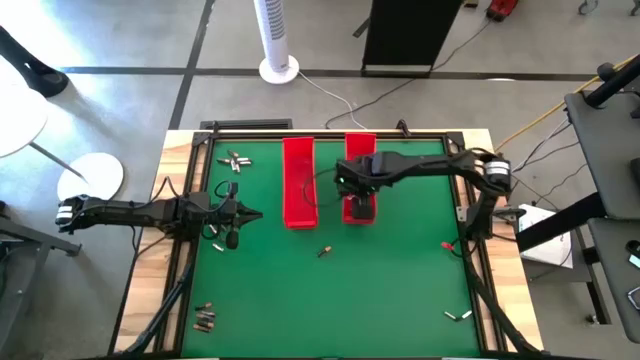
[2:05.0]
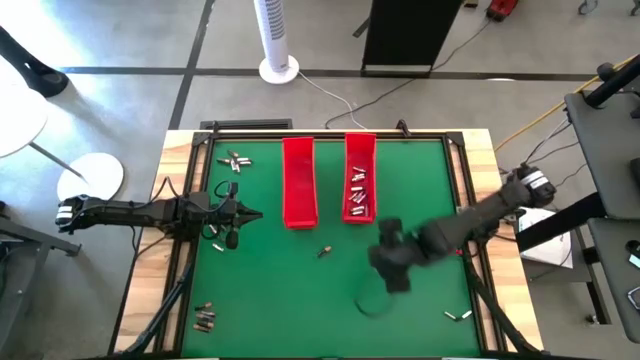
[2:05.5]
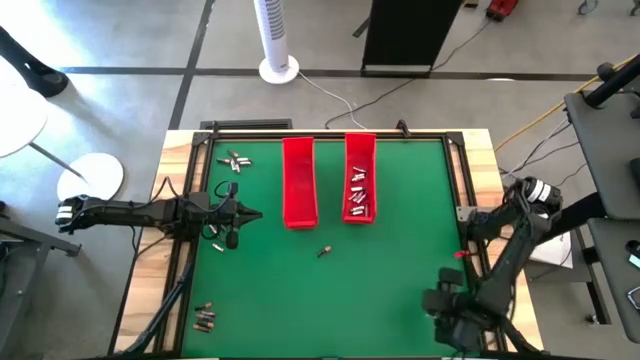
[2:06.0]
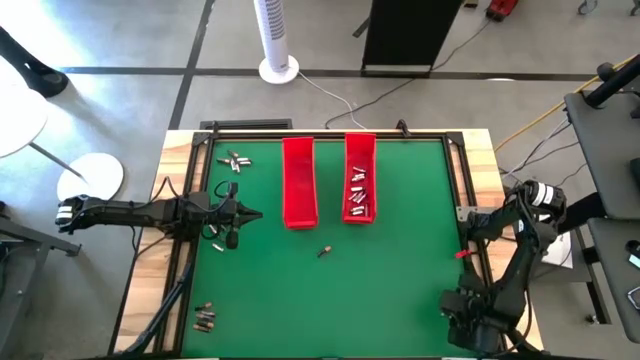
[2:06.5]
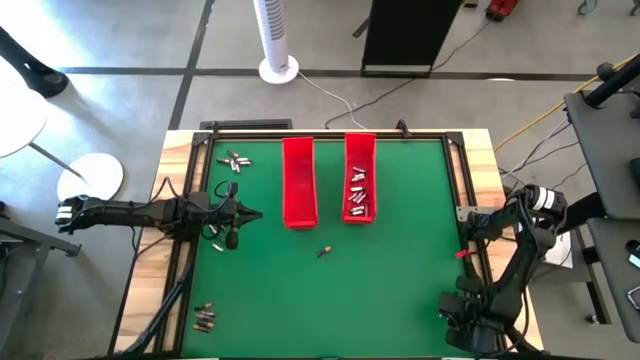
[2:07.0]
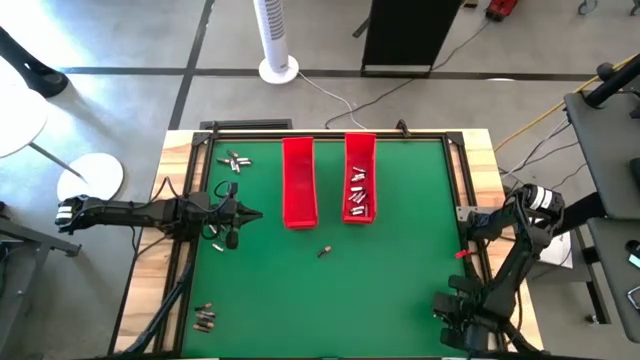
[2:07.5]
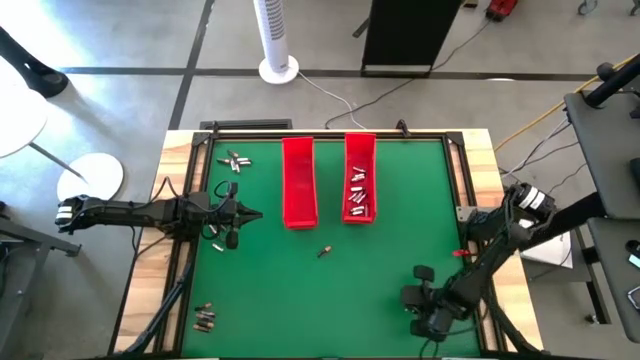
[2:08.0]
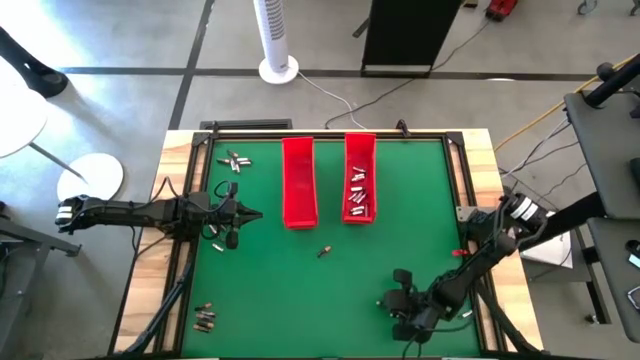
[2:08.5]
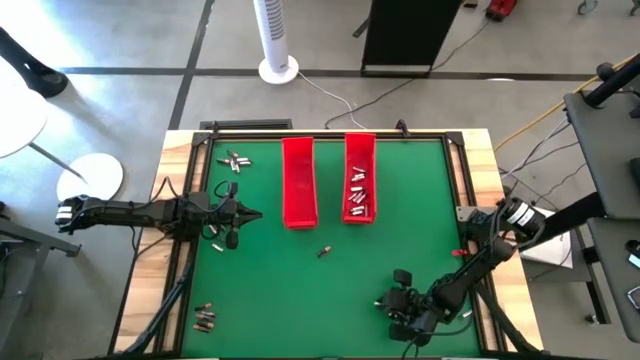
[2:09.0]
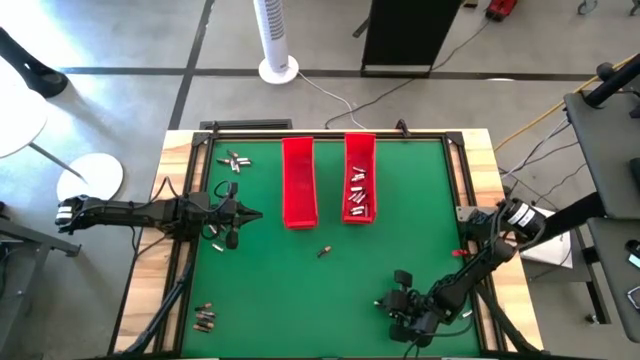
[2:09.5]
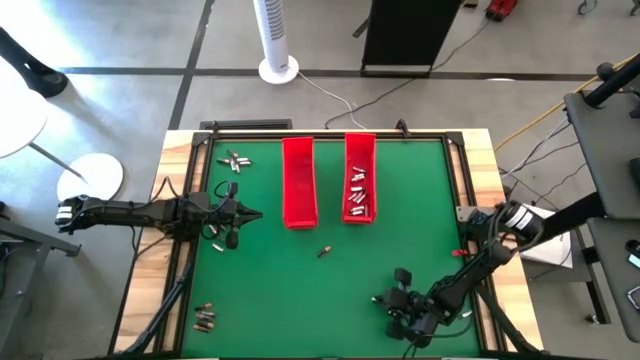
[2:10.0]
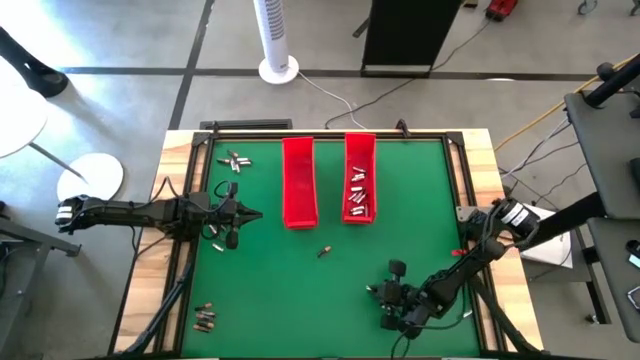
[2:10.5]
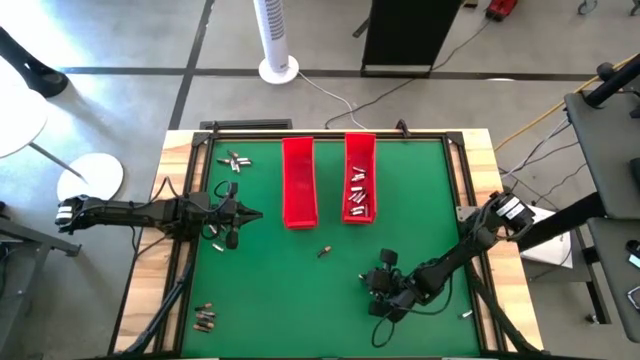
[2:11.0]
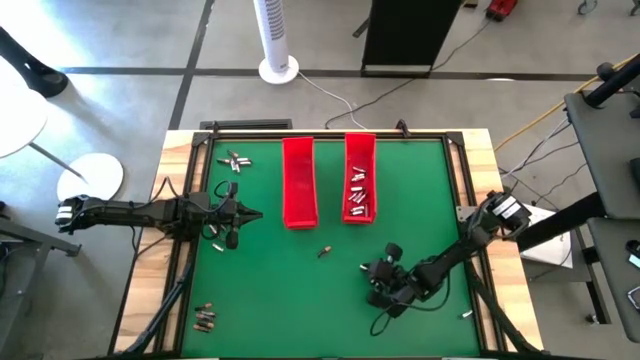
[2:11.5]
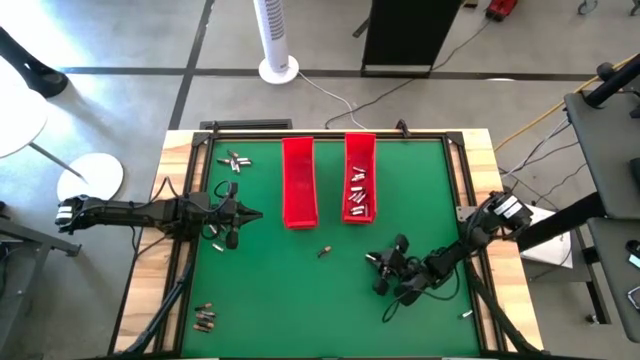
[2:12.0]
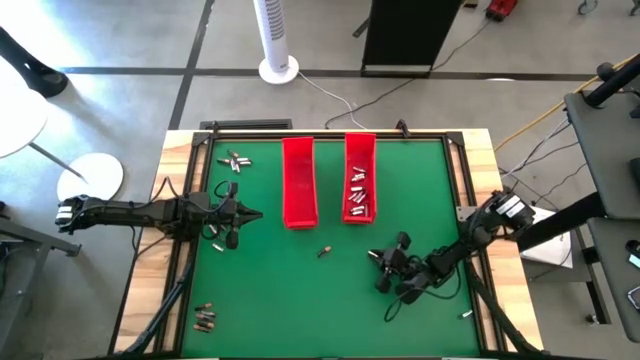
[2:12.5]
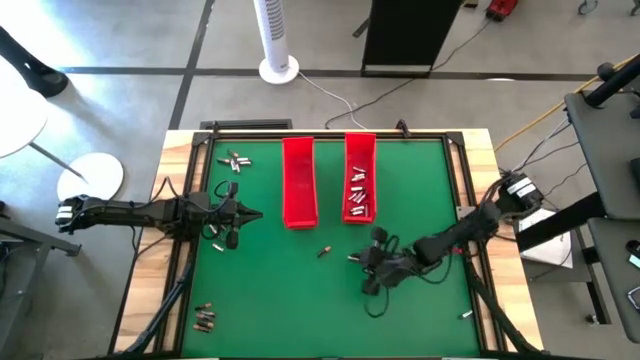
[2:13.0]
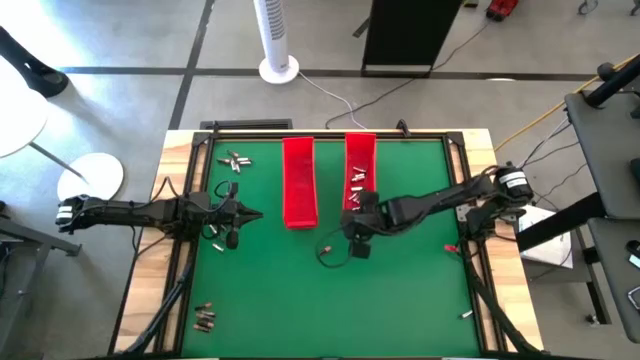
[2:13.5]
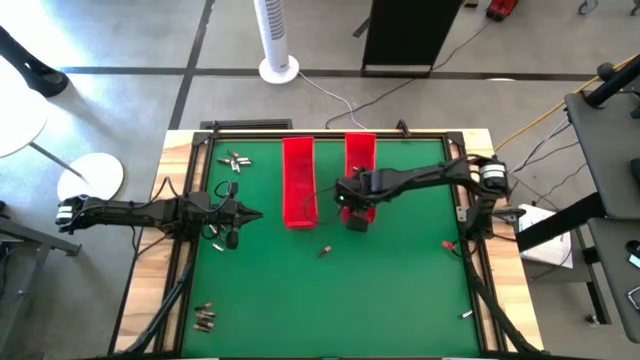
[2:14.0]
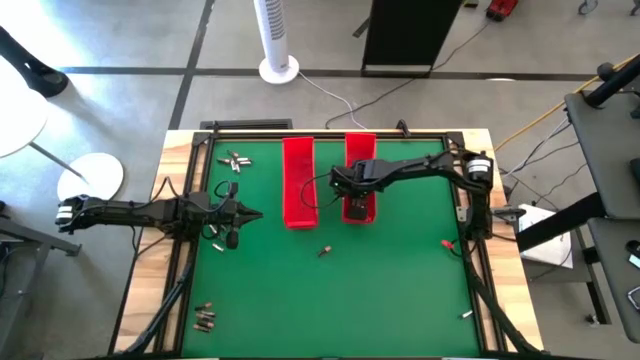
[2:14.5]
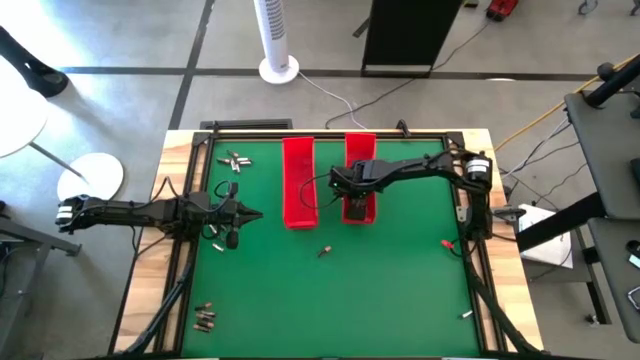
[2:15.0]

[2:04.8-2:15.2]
Task: Sort batteries
Put the silver battery into the right red bin

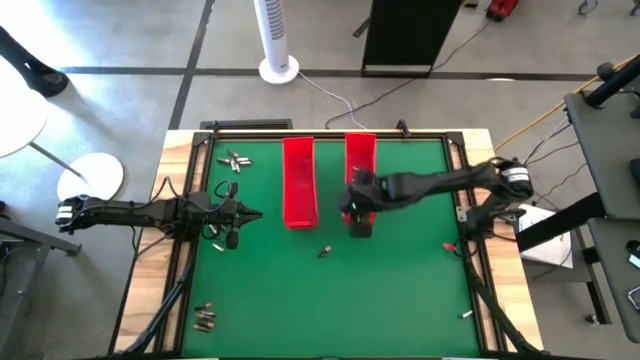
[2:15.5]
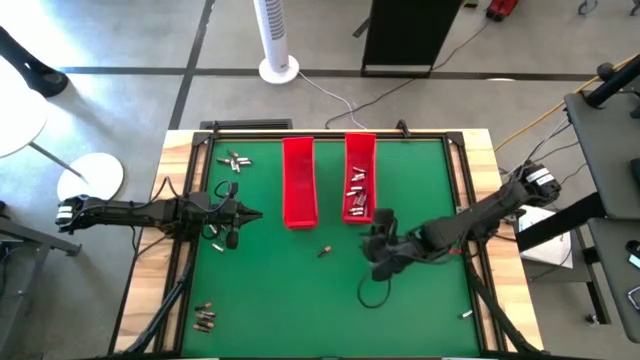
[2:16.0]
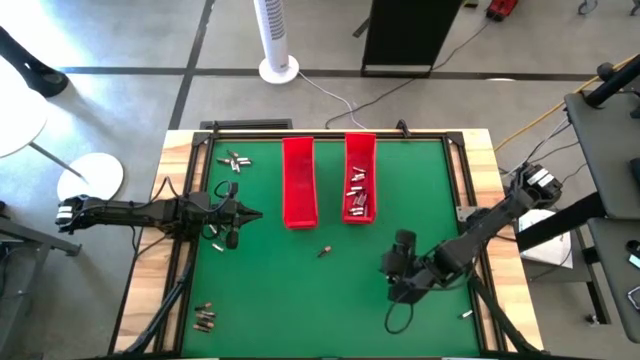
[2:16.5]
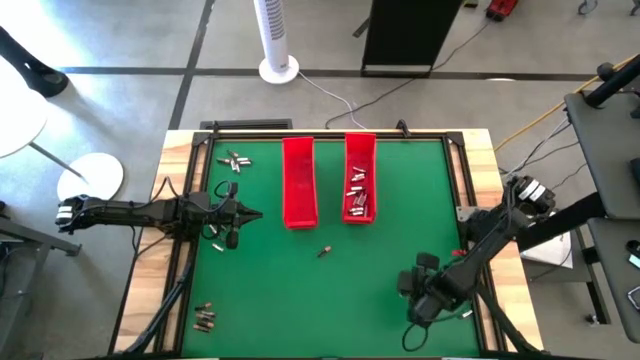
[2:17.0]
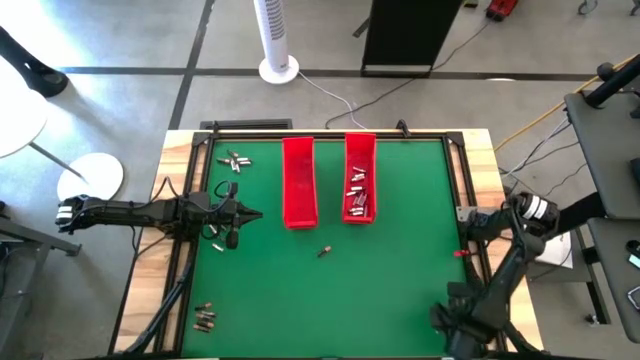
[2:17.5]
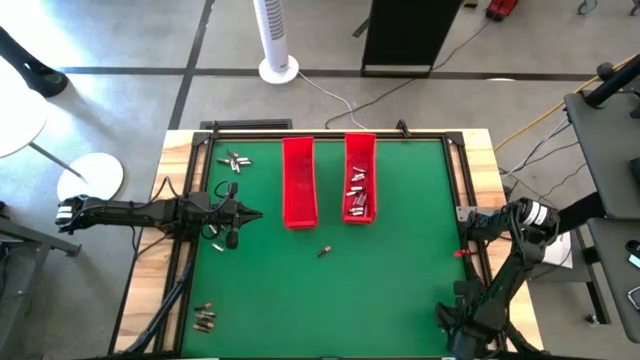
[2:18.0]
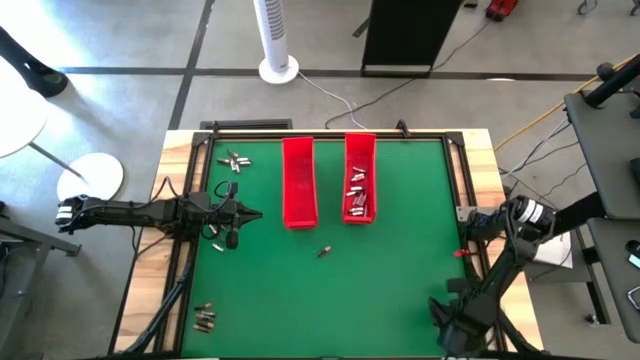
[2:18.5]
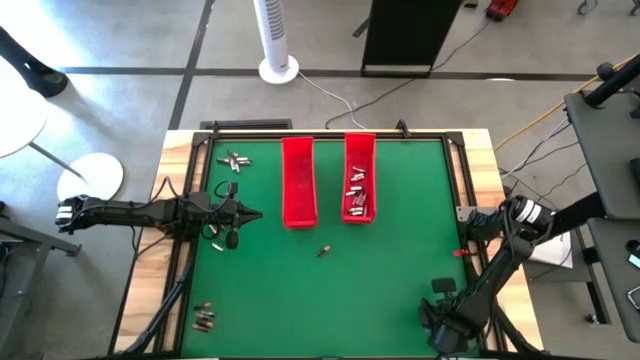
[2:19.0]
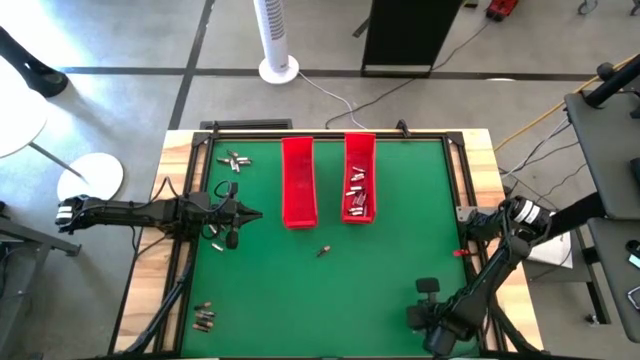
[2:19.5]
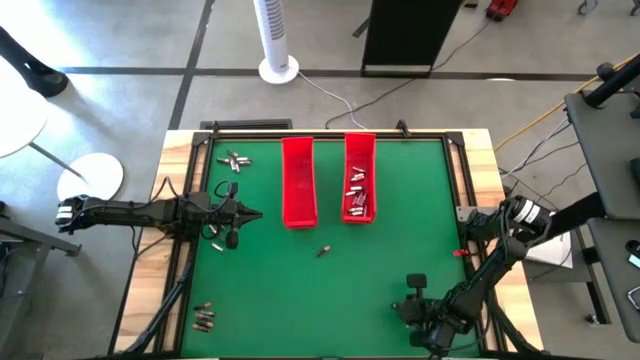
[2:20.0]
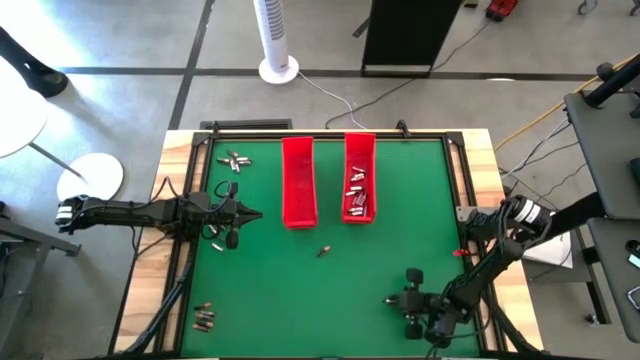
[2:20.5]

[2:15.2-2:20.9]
Put the silver battery into the right red bin

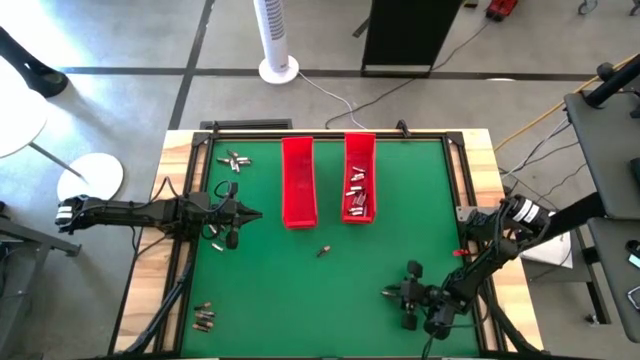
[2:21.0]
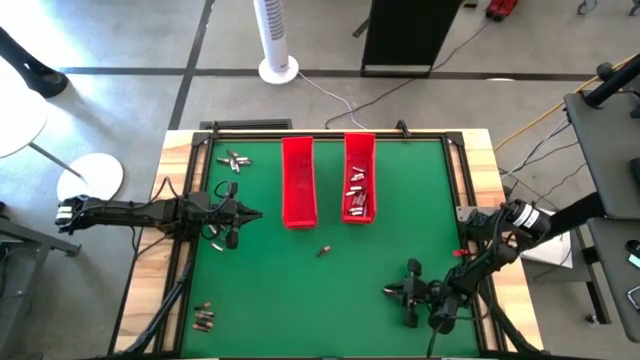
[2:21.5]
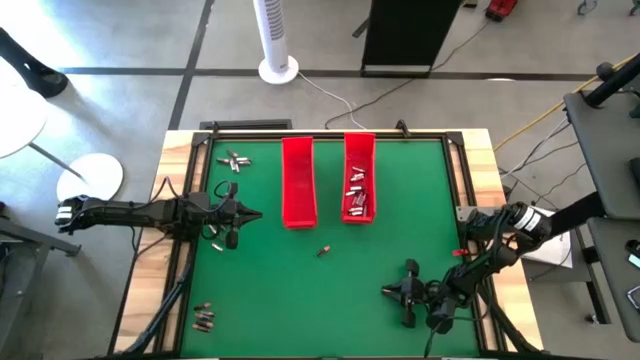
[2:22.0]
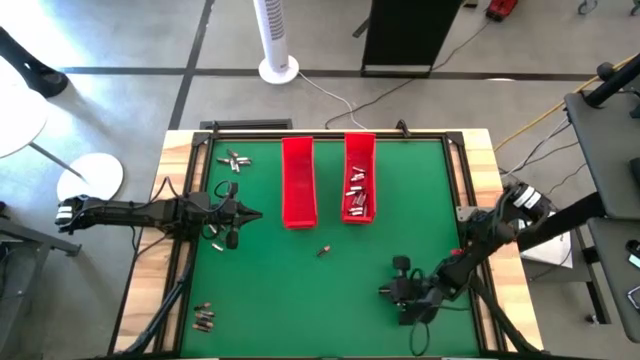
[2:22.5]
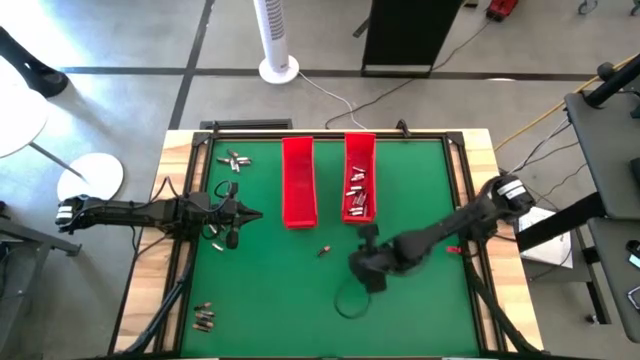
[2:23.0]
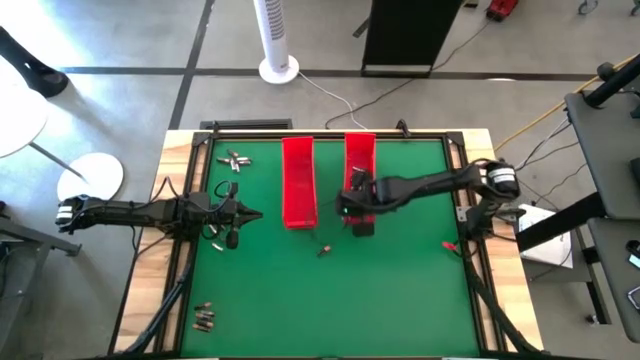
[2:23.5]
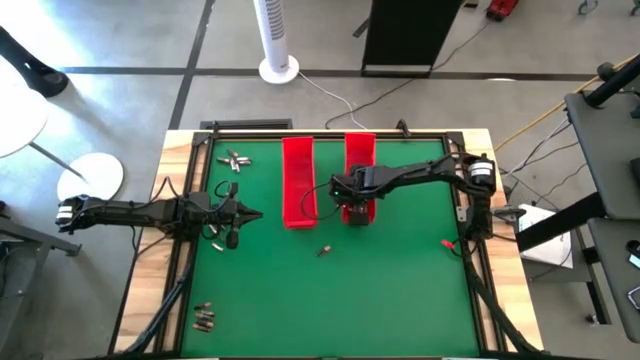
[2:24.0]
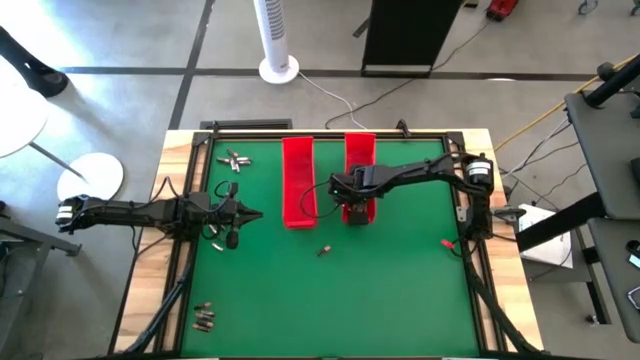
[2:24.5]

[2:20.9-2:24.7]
Put the silver battery into the right red bin
